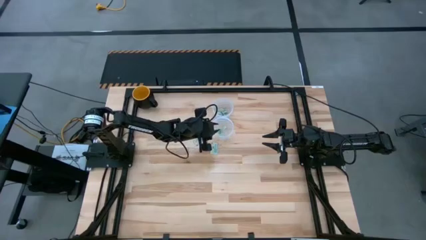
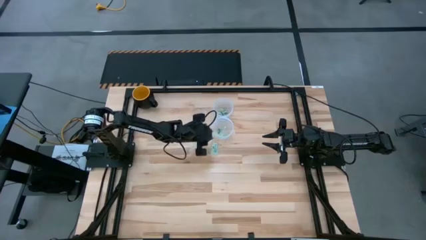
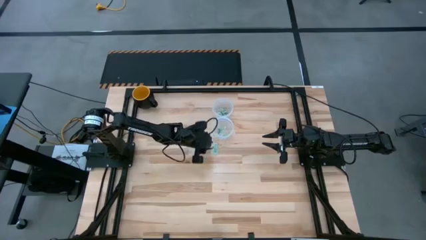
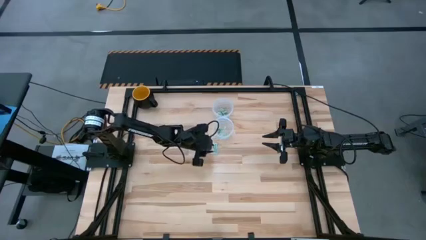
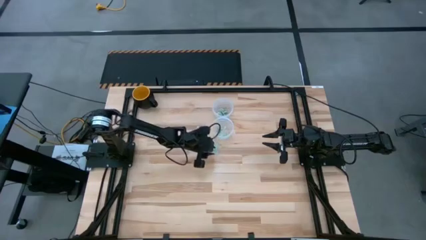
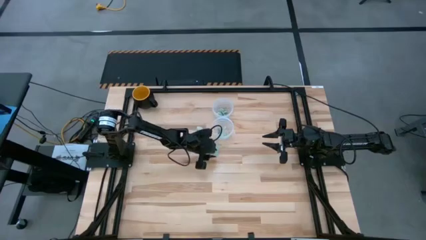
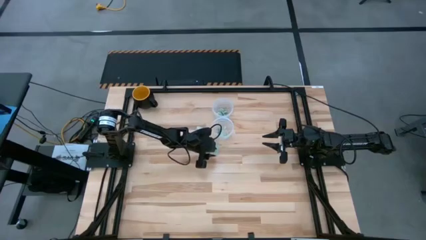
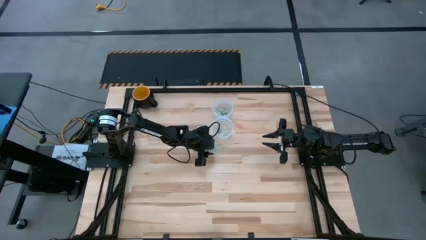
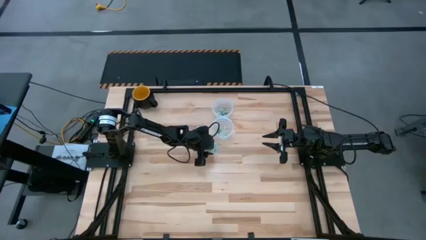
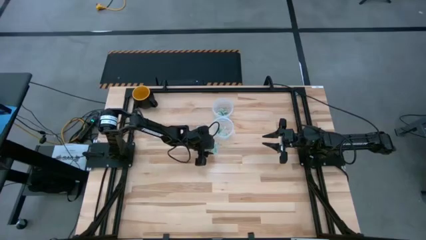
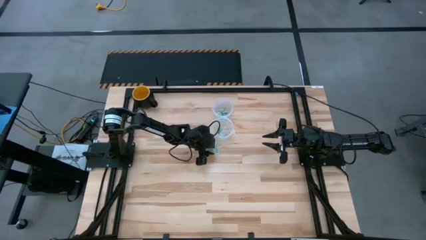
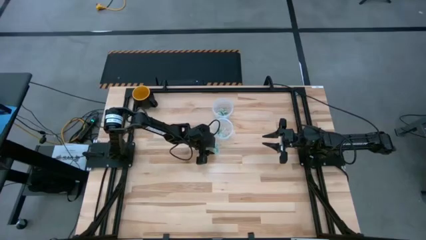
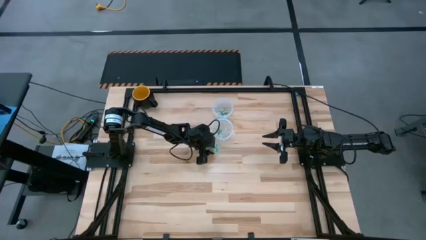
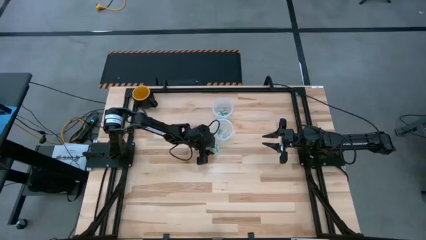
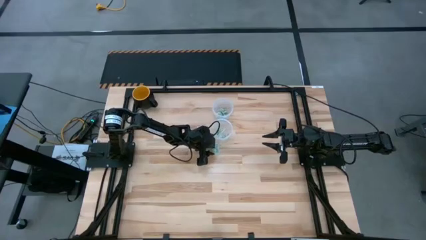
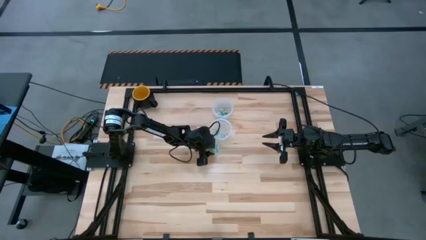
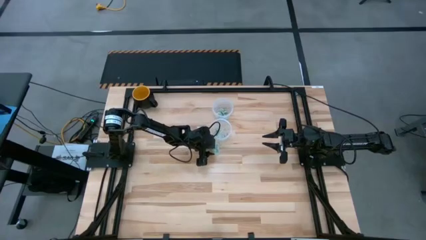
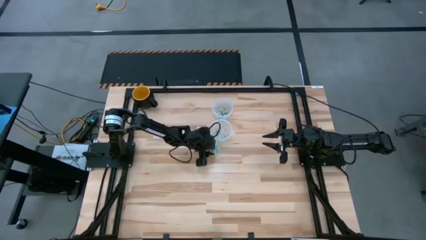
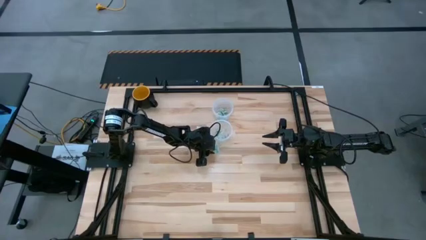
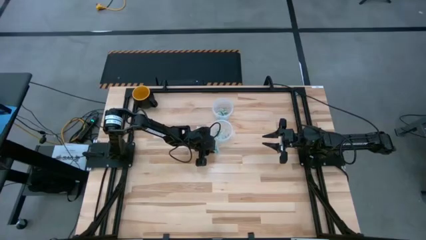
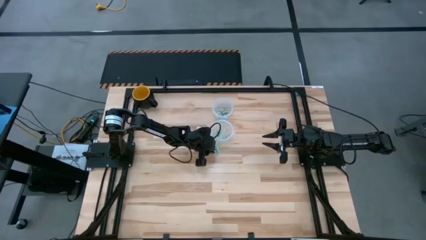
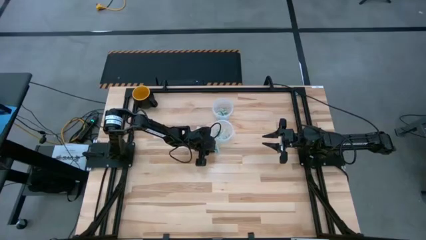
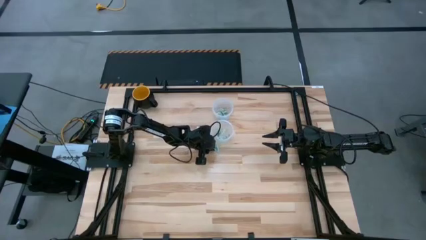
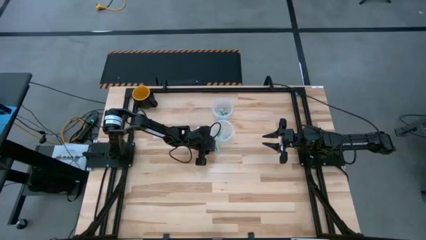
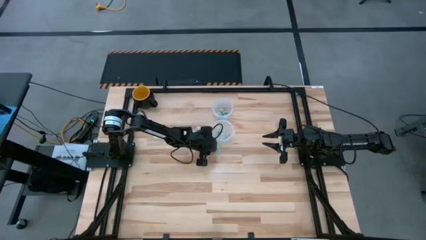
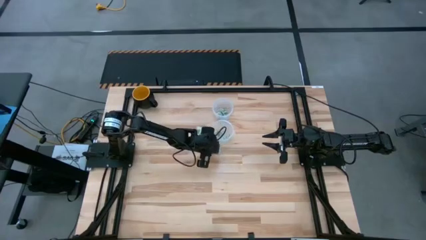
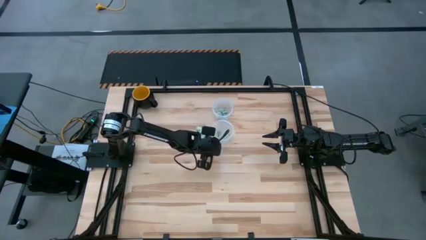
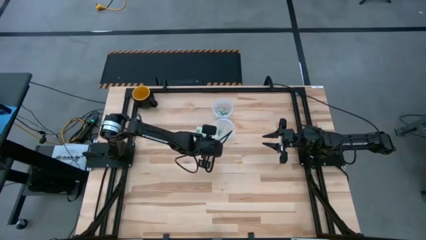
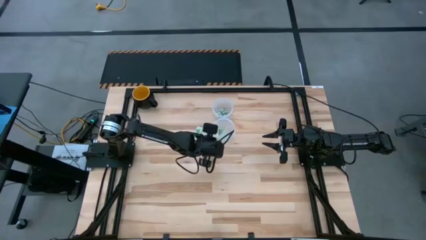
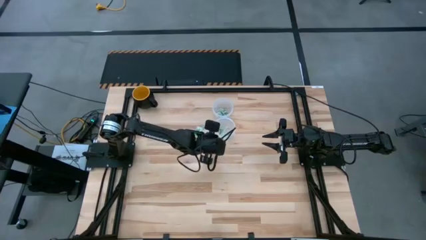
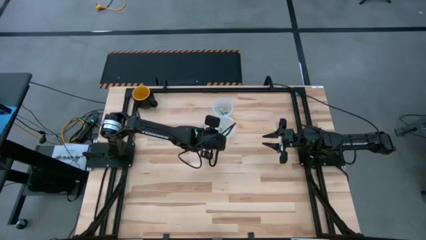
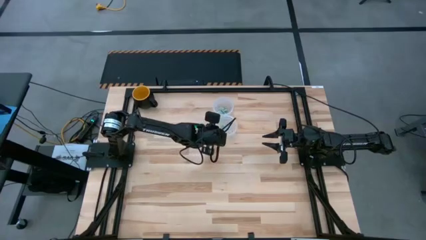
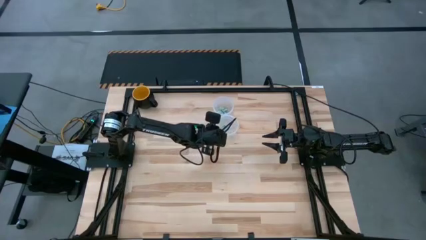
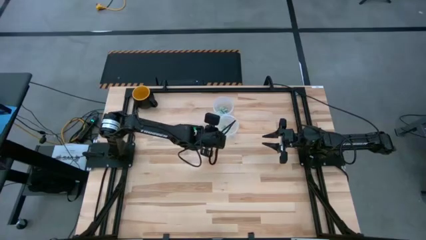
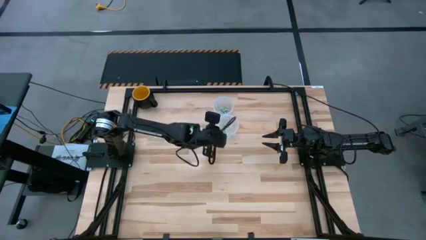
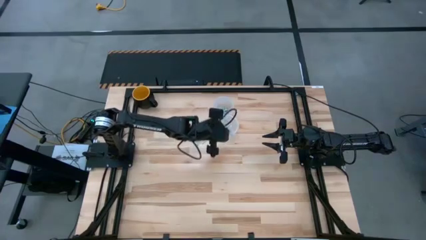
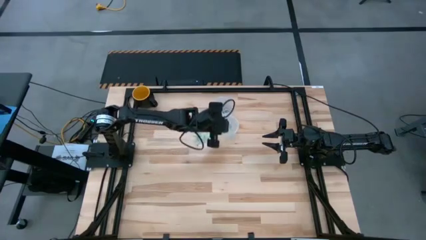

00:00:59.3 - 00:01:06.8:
Task: Pick and place items into bin
Put the green stevia packet into the bottom transparent bin

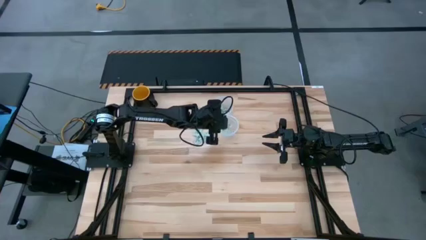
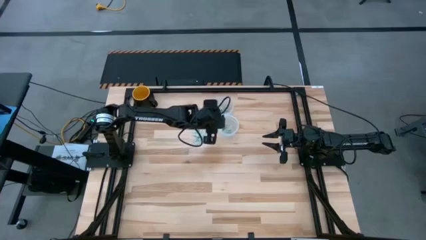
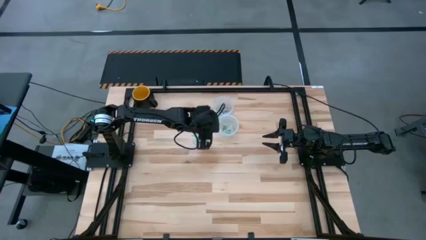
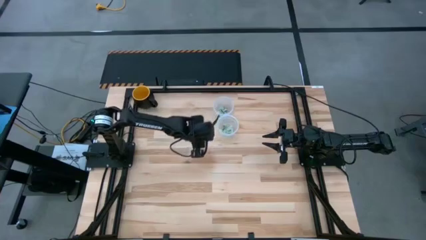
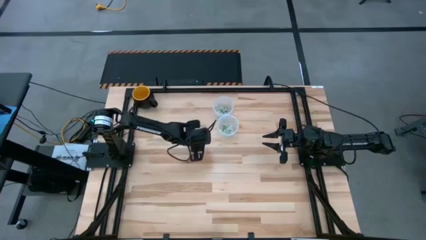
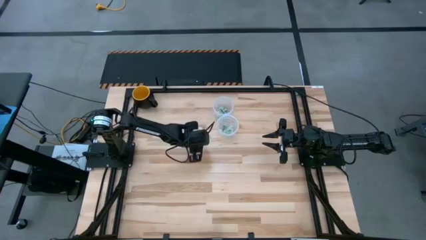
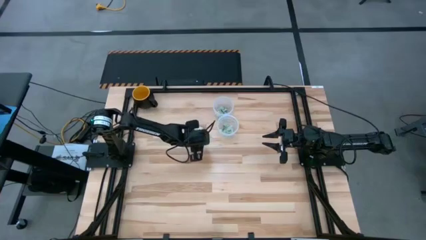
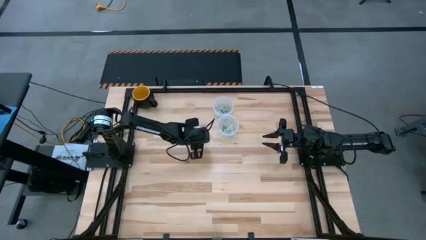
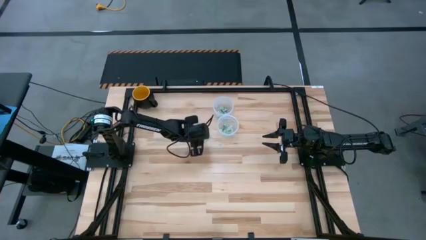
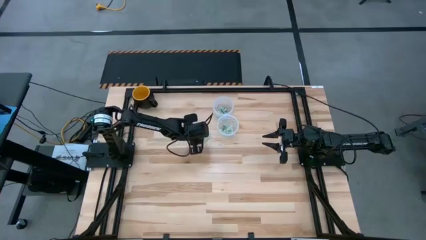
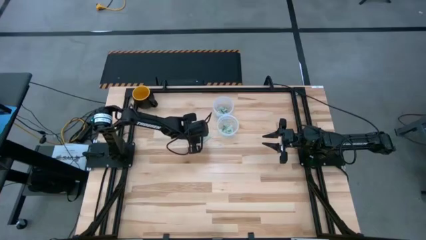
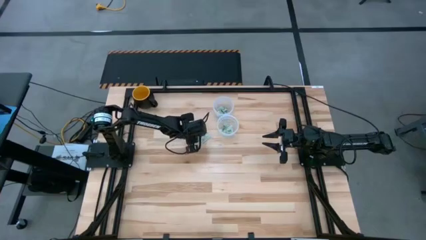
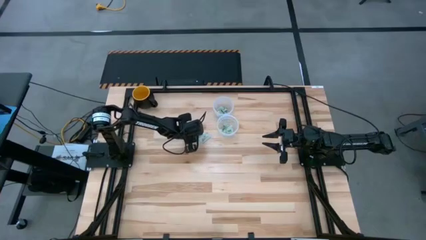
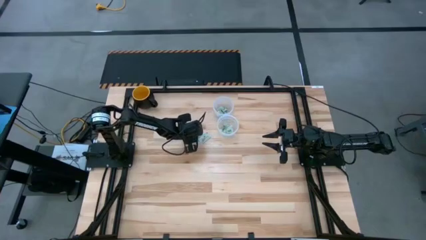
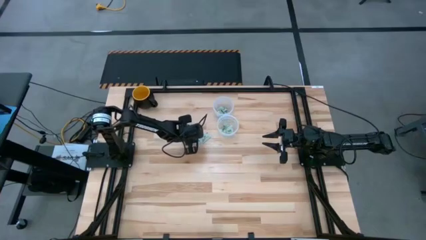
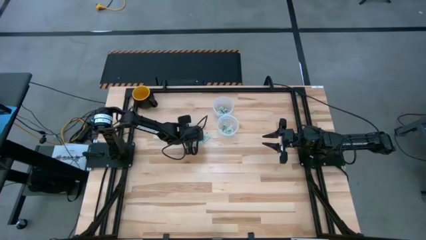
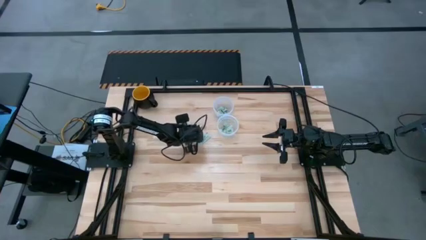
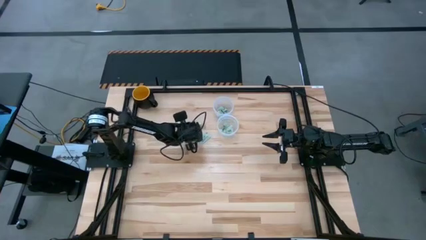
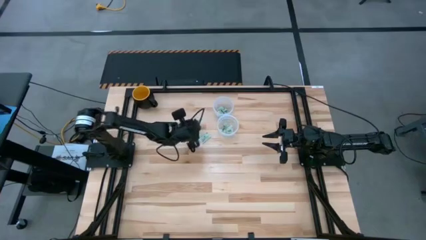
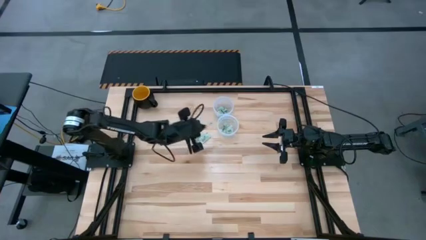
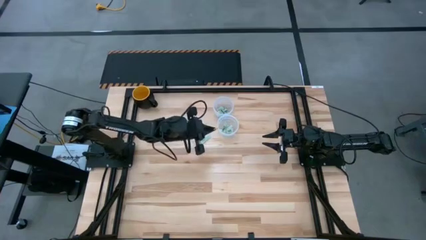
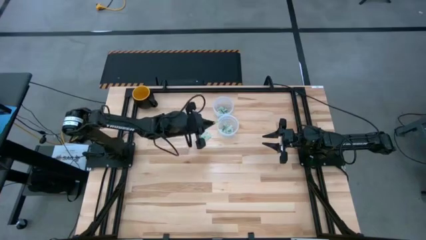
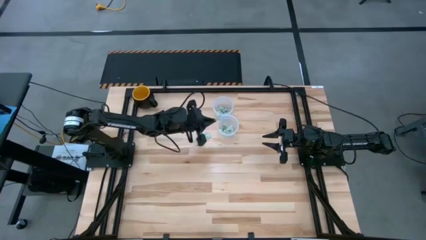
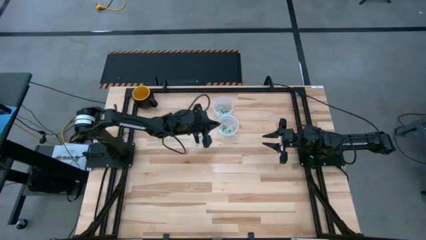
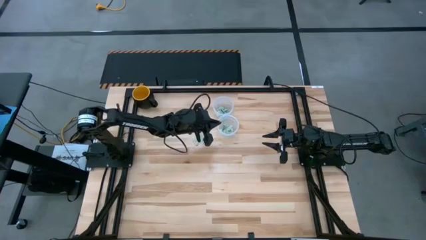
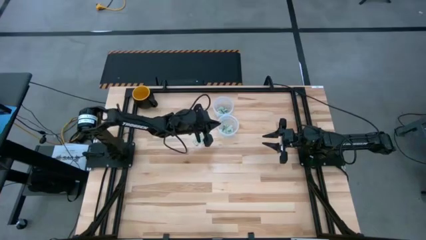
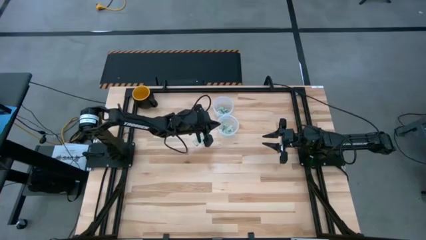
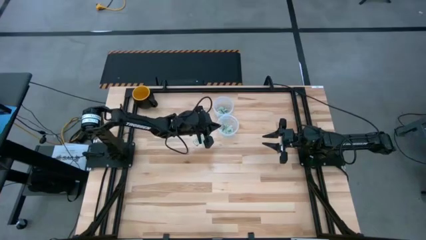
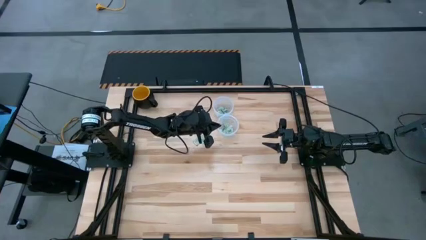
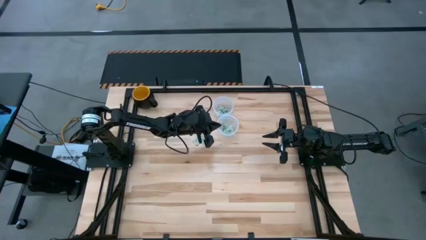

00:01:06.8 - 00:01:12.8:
Put the green stevia packet into the bottom transparent bin

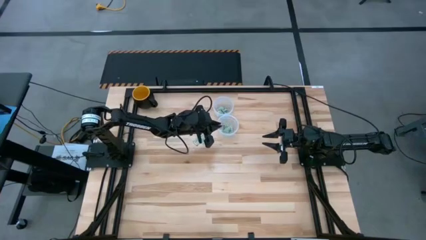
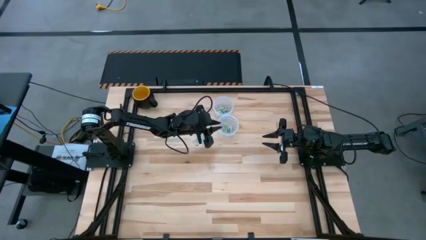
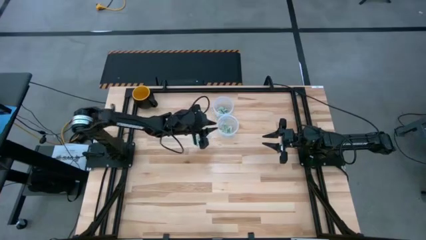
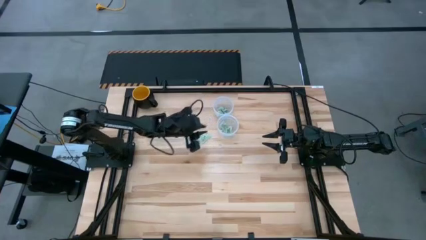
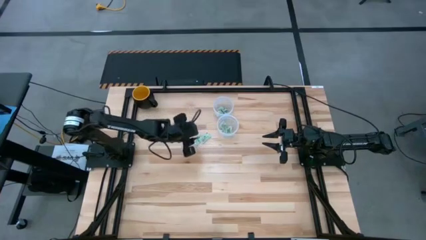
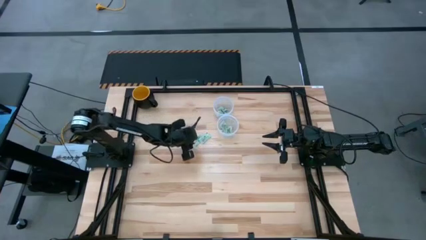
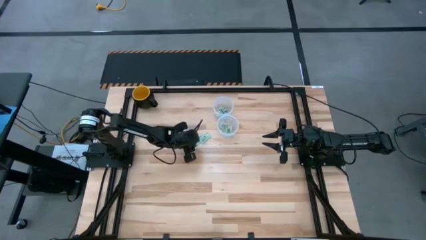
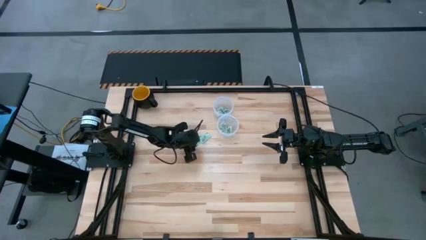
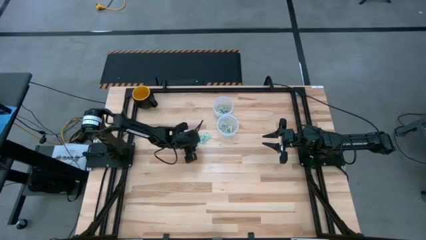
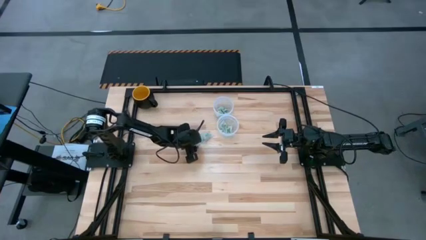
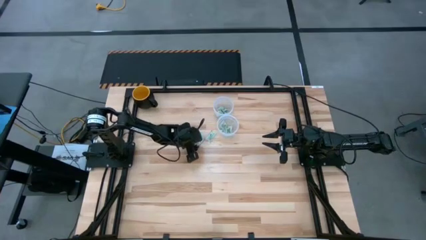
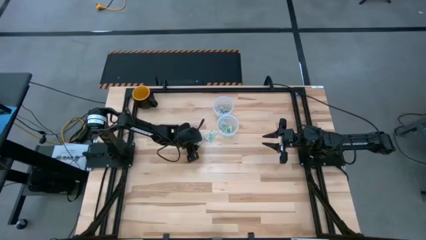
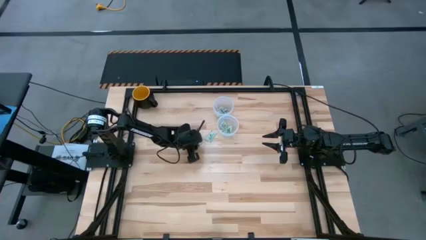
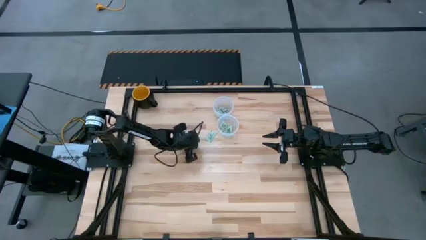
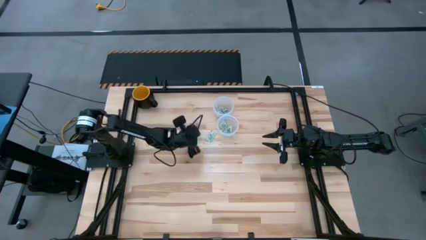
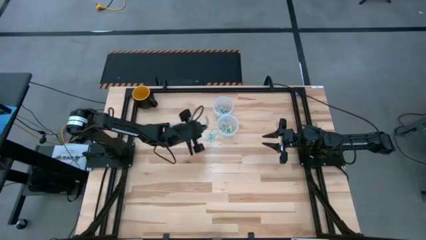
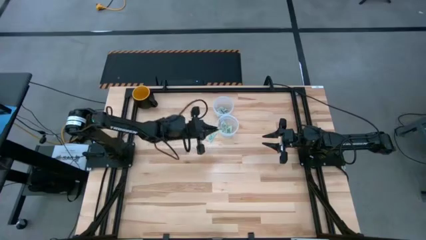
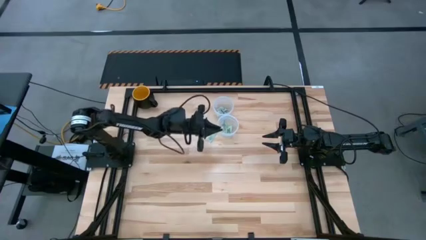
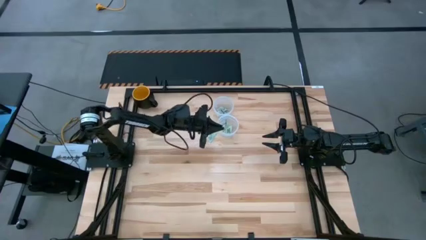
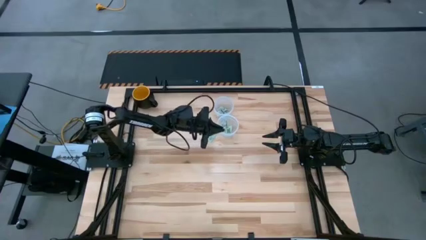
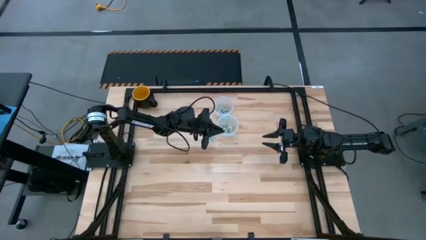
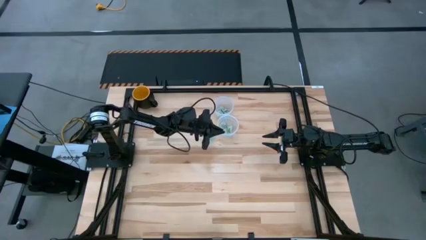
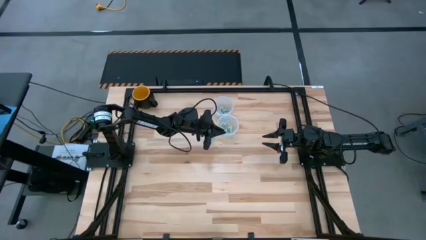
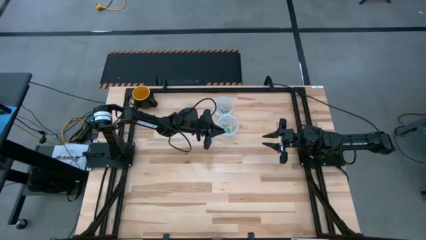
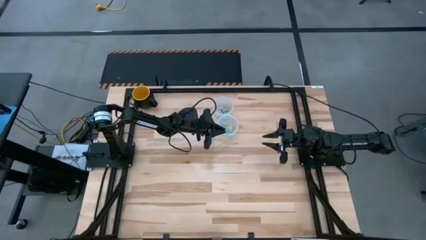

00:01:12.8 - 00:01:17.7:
Put the green stevia packet into the bottom transparent bin
